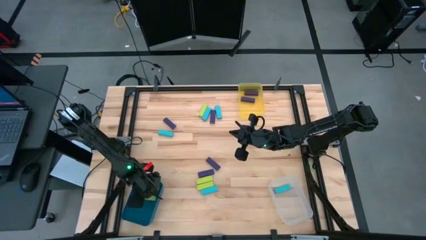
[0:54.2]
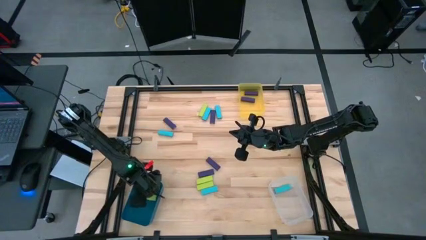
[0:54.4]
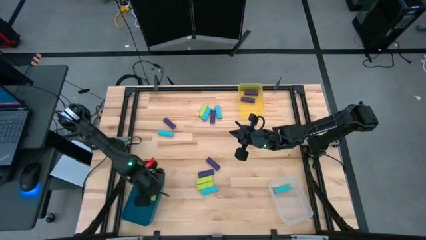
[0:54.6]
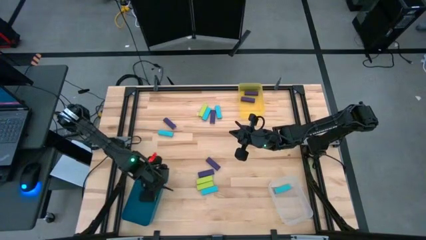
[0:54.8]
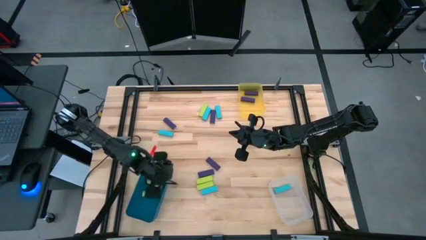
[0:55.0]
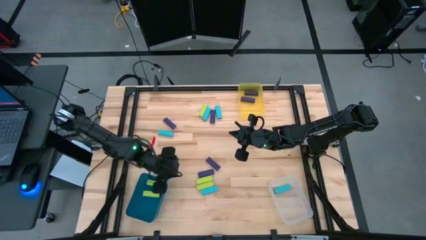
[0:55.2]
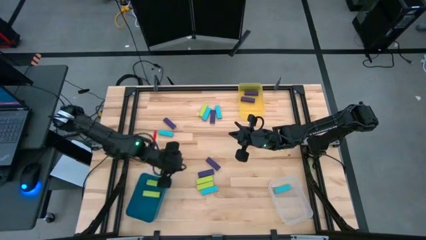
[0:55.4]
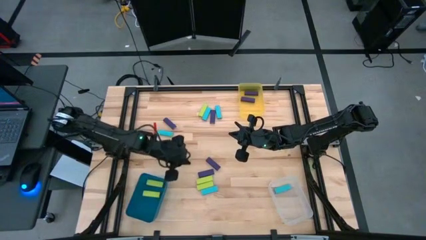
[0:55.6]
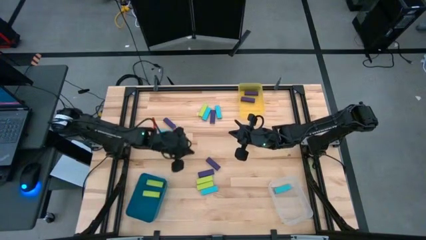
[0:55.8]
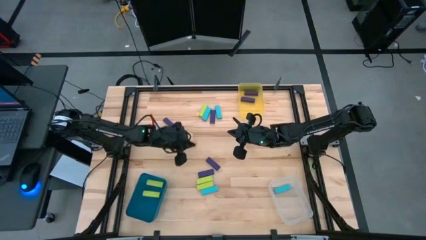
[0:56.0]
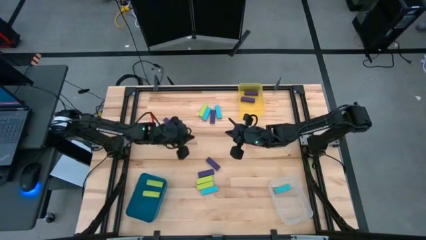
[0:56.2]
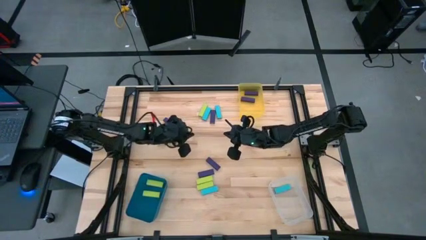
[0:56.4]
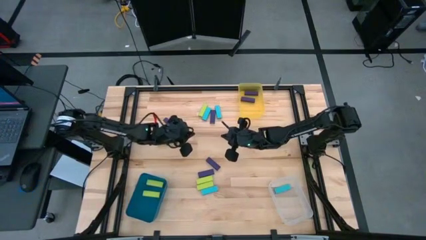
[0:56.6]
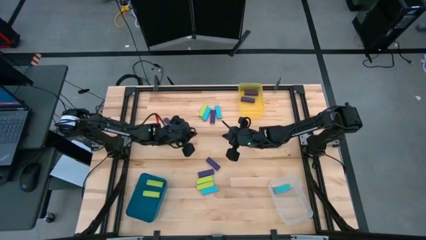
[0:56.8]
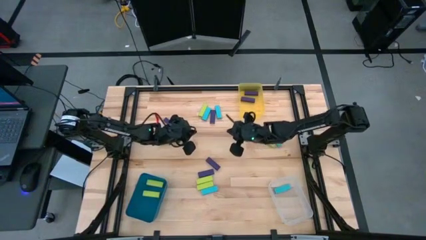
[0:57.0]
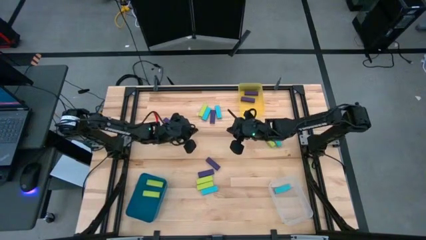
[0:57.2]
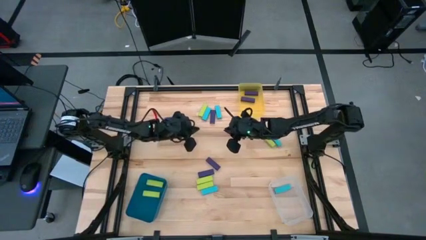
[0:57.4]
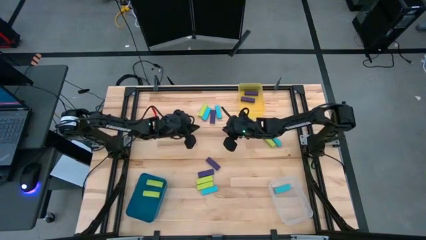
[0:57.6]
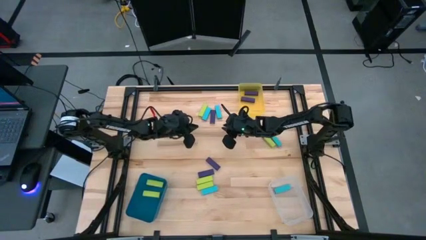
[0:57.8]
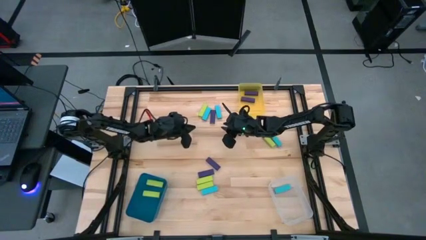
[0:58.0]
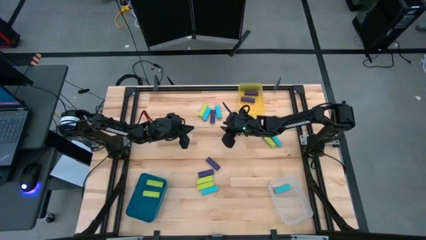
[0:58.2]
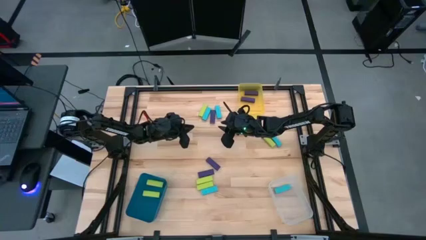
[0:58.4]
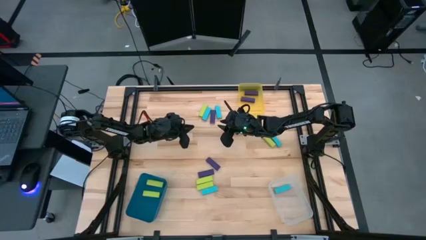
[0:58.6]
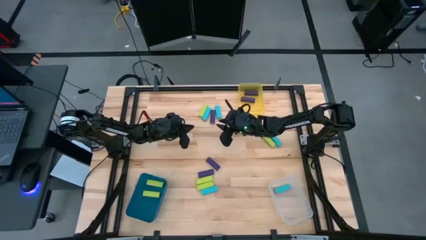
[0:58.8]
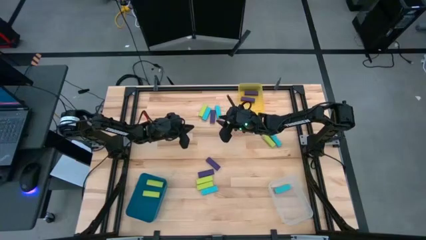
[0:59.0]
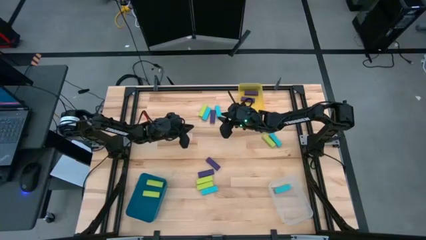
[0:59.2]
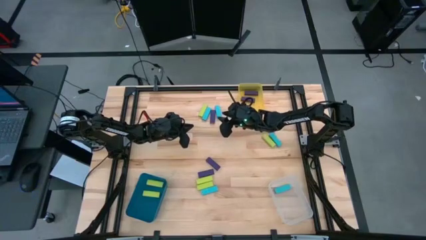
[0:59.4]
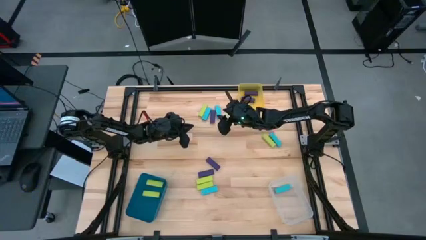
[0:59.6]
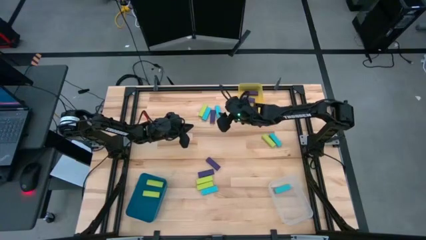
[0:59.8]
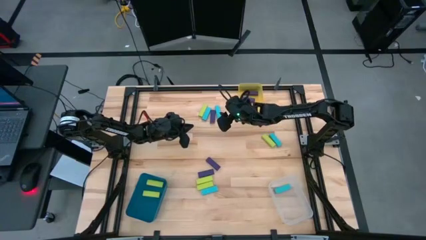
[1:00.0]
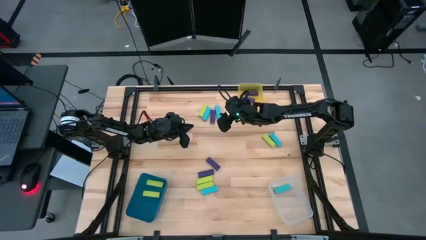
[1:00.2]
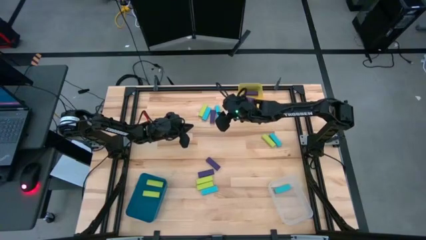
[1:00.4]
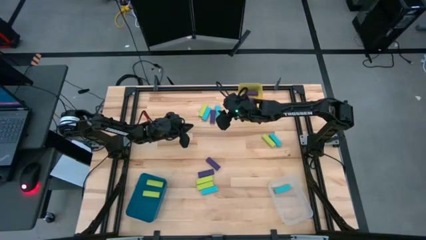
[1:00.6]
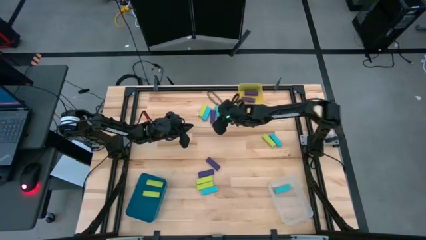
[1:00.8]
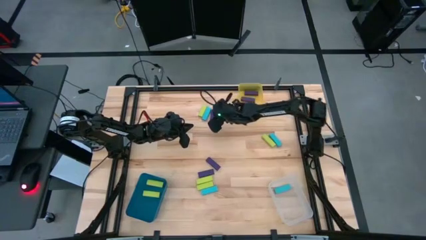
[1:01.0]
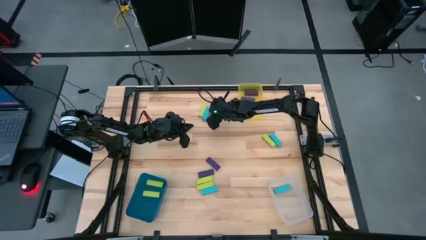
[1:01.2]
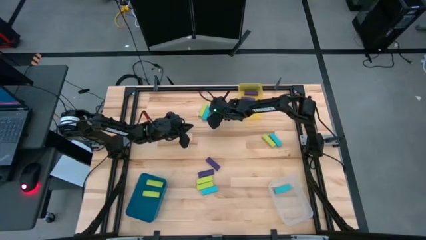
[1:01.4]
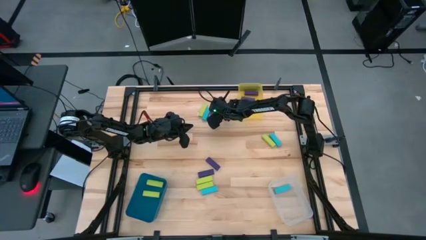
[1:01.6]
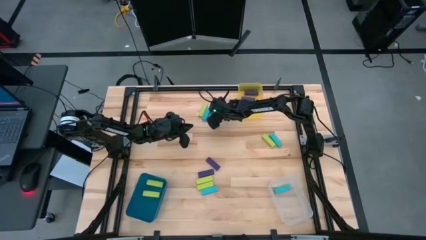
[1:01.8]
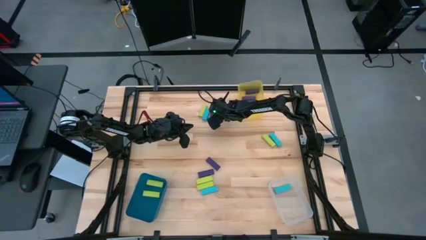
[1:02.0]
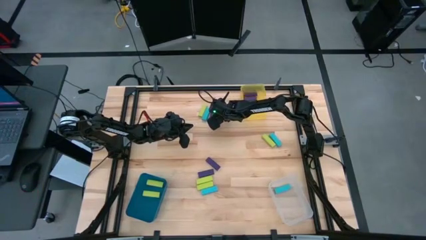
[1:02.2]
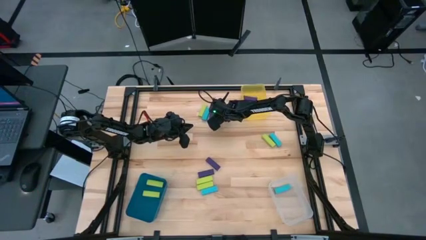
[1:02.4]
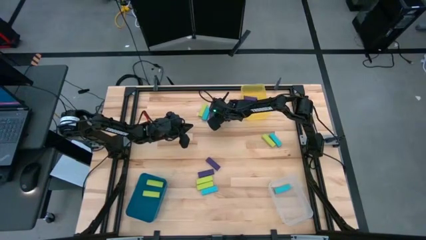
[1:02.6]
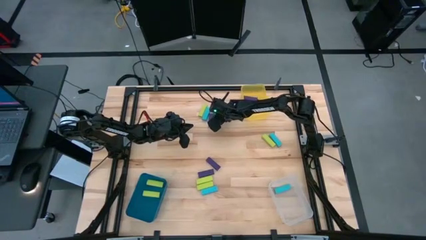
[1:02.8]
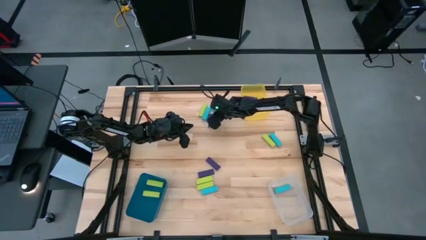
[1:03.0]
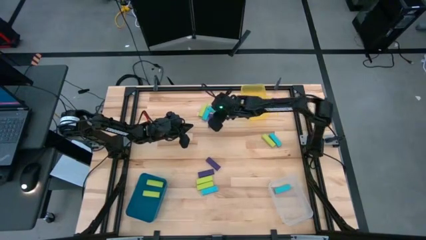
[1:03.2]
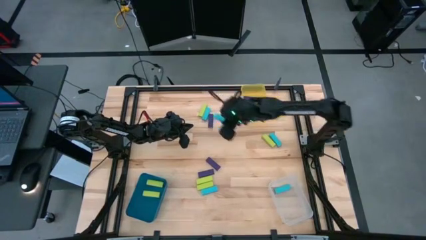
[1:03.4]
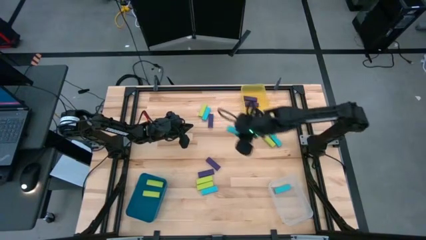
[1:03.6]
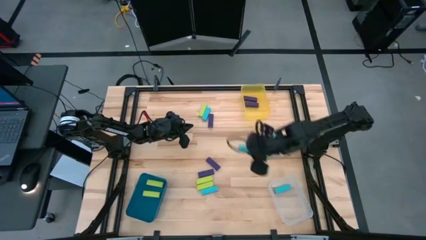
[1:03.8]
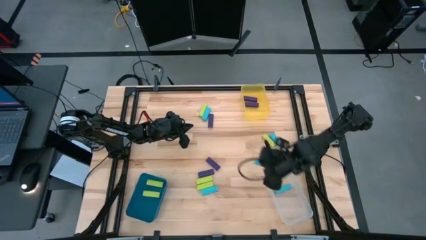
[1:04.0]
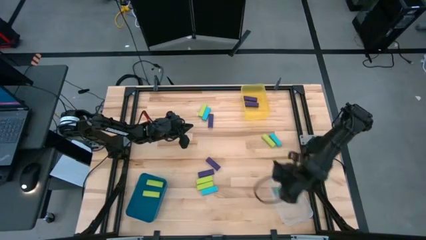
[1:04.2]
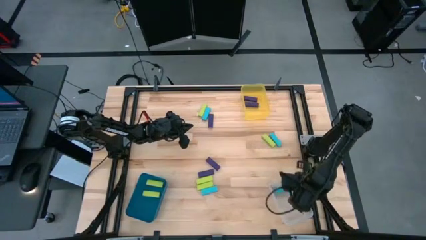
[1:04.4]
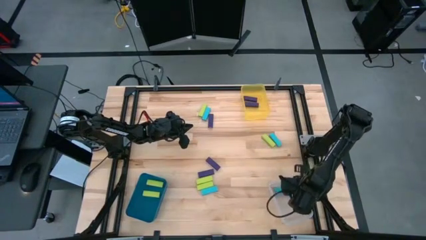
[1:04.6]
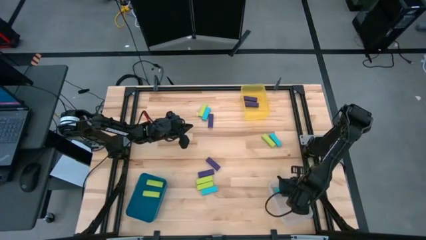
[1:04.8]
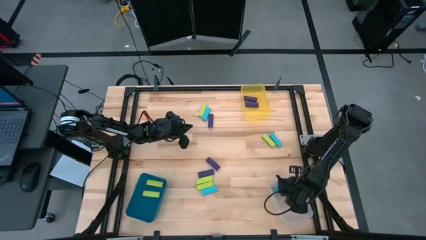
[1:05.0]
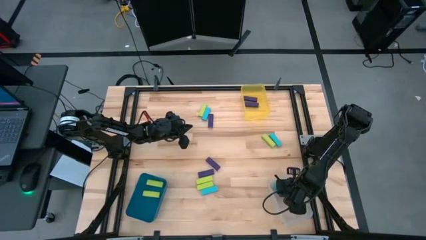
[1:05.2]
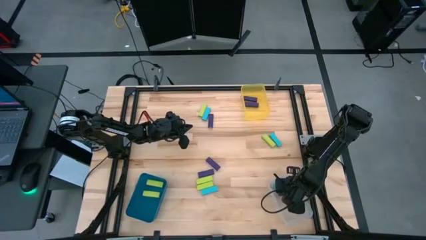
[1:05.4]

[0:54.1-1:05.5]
Task: Sort blocks
Put the light blue block into the transparent bin

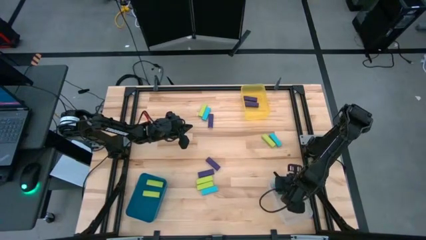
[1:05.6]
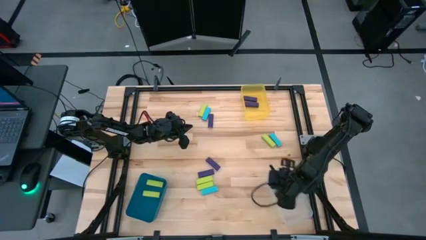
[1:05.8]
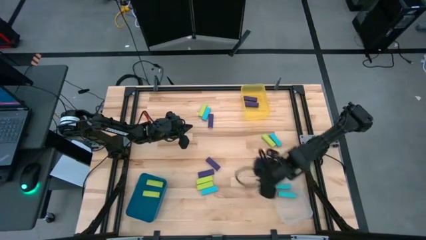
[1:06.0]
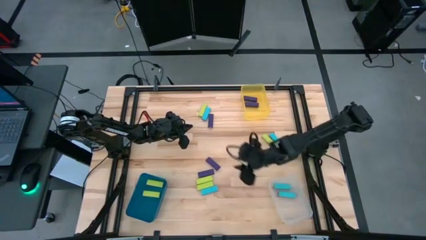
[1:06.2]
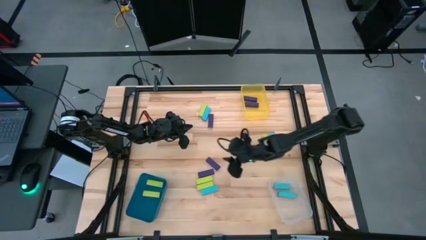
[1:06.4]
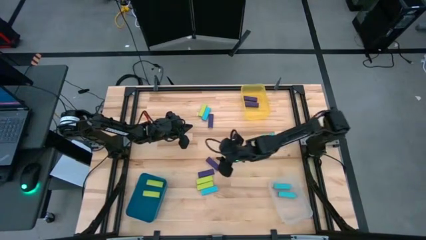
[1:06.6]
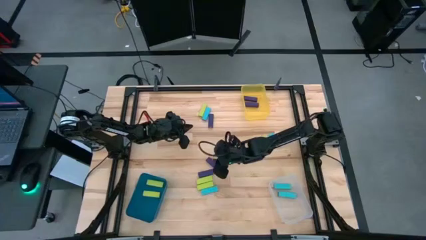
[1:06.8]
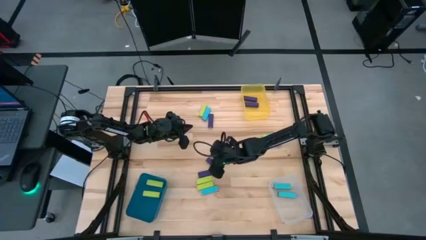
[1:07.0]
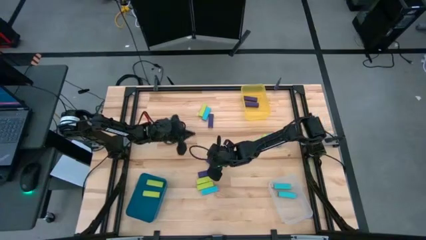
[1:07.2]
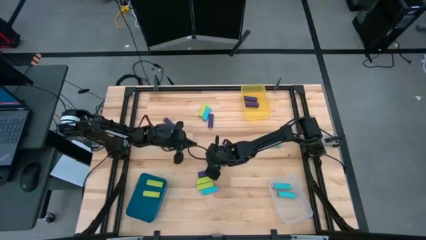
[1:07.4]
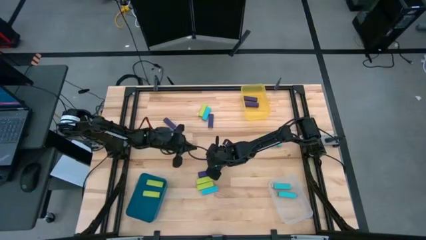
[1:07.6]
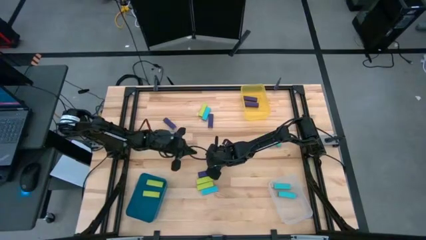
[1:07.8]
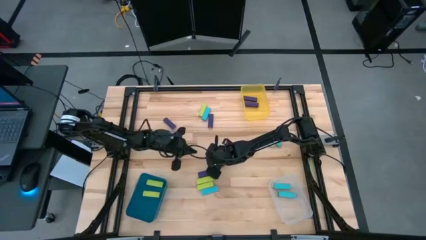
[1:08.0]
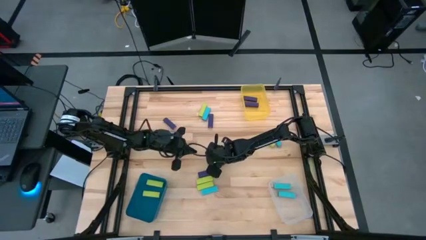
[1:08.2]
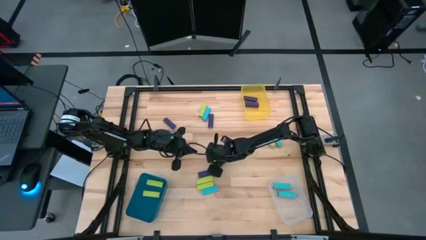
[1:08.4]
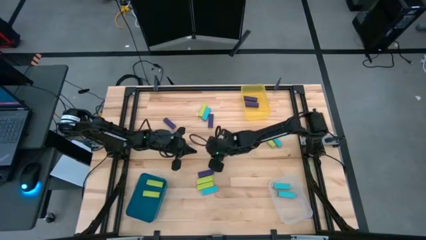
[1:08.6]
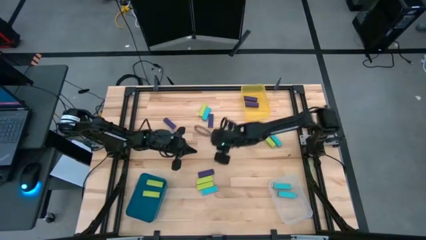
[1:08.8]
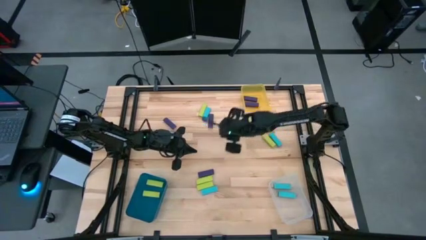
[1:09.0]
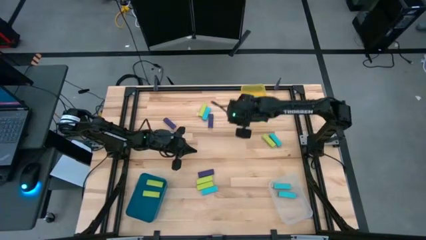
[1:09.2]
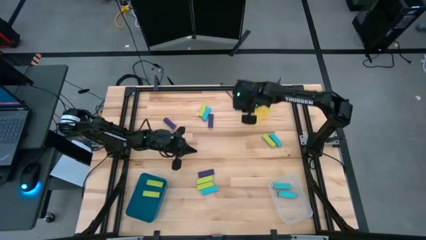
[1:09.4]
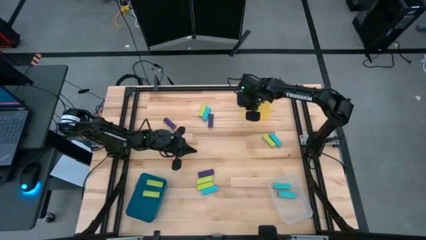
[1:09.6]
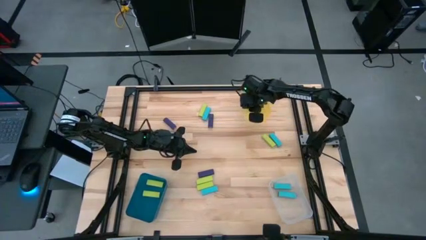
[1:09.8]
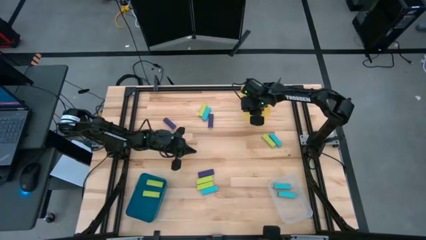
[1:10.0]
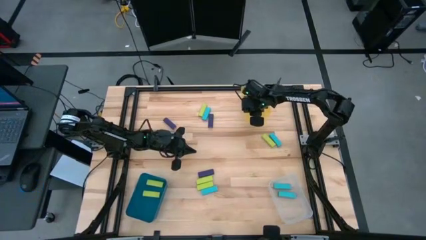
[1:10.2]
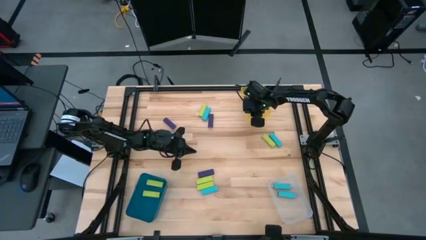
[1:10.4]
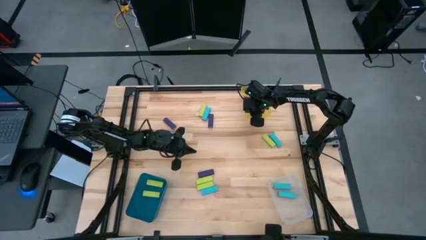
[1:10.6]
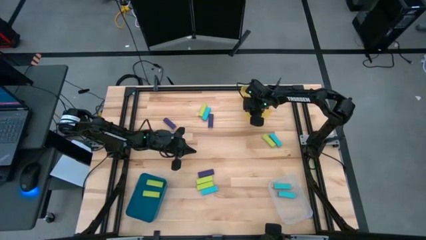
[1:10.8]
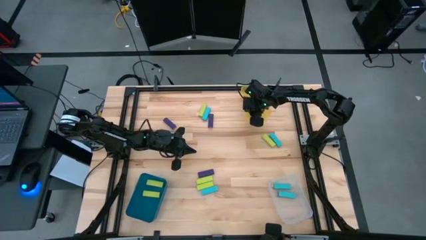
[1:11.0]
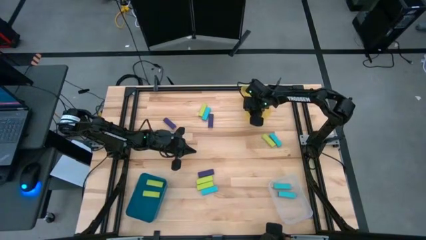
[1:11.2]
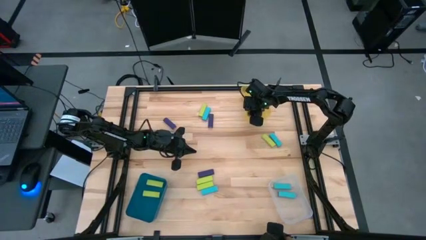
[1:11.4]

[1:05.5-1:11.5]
Put the violet block into the transparent yellow bin

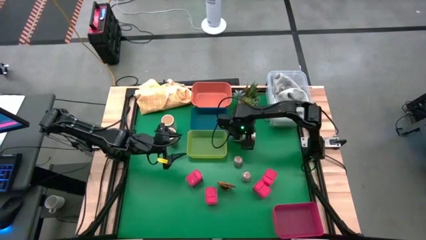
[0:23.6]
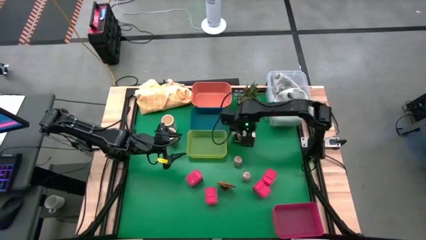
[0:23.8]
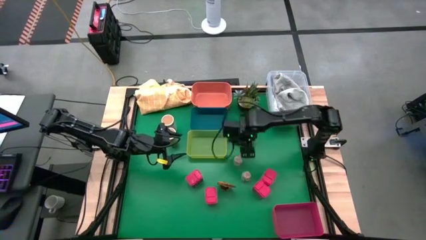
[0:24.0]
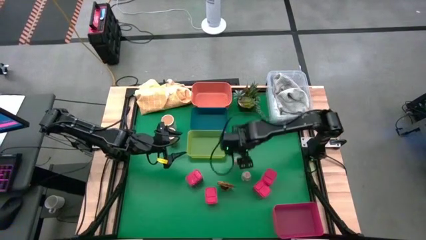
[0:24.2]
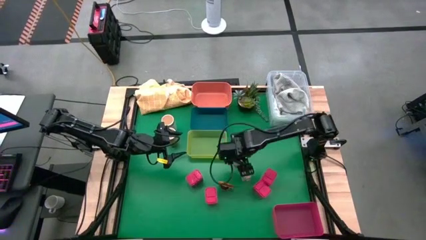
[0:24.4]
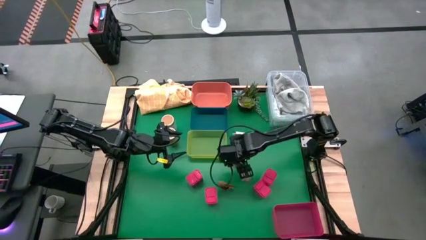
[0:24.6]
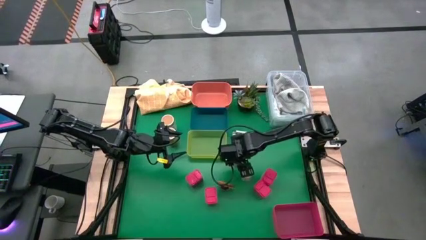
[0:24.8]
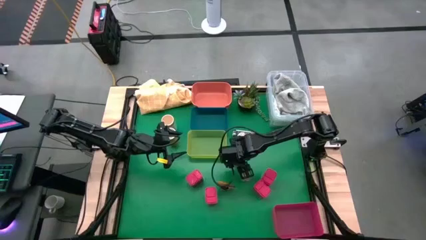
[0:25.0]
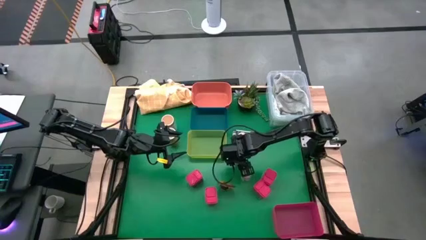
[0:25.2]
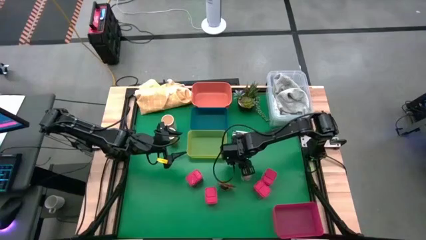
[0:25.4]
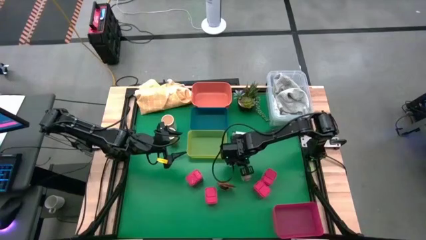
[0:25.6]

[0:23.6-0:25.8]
Task: Sort spices by type
Put the brown seasoning bottle into the orange bin
